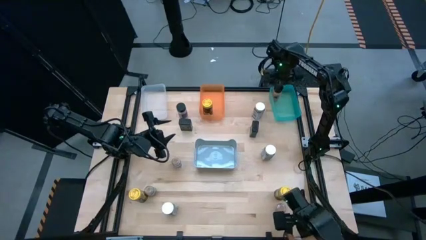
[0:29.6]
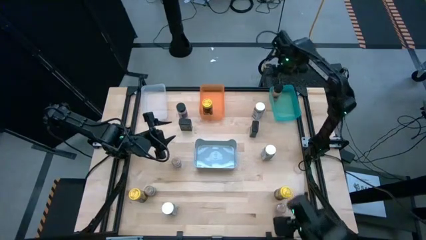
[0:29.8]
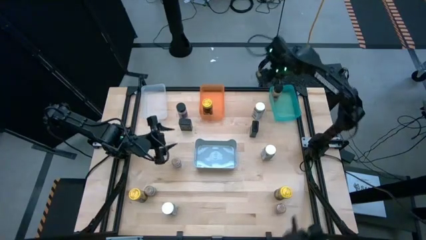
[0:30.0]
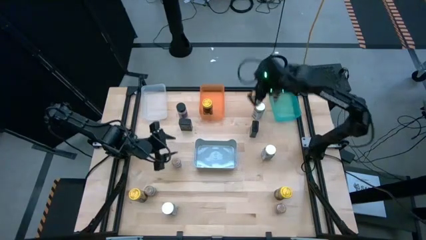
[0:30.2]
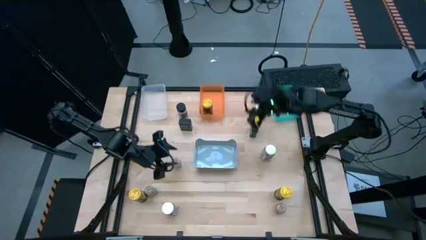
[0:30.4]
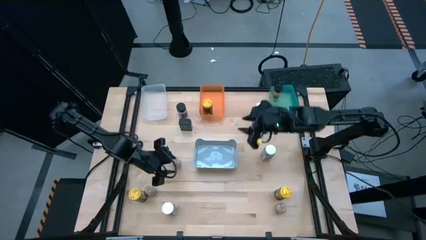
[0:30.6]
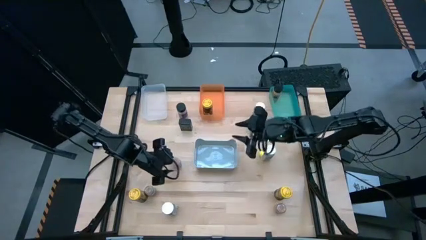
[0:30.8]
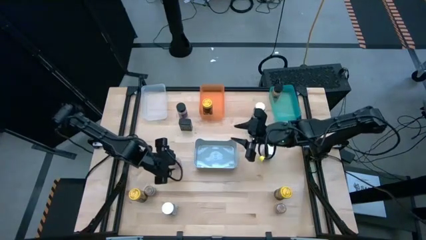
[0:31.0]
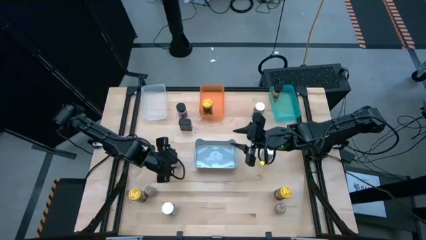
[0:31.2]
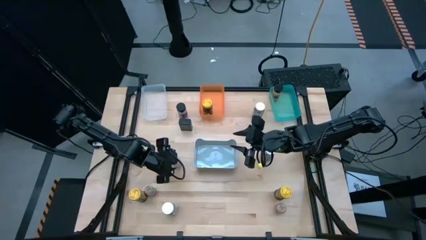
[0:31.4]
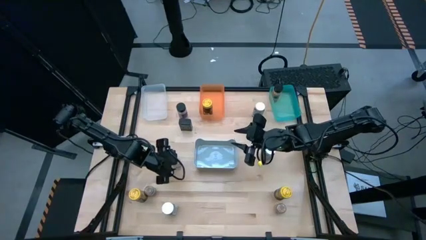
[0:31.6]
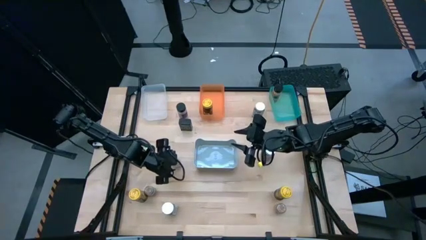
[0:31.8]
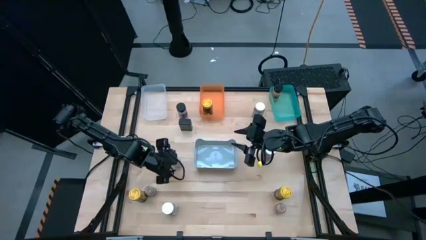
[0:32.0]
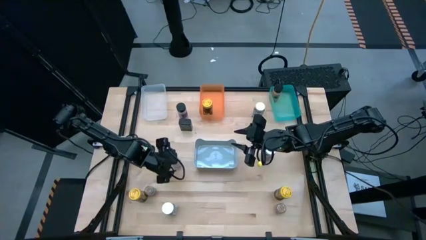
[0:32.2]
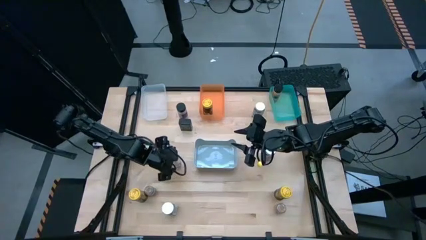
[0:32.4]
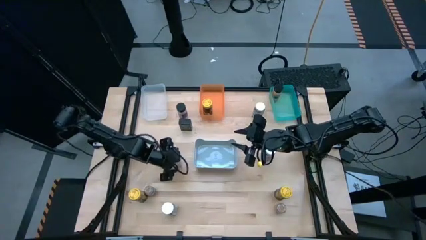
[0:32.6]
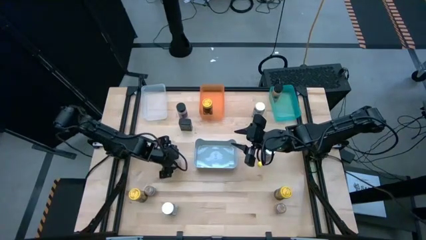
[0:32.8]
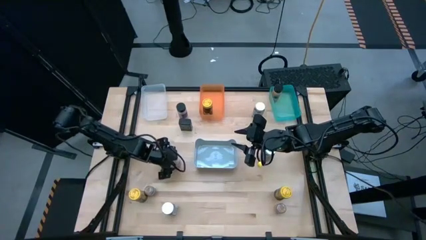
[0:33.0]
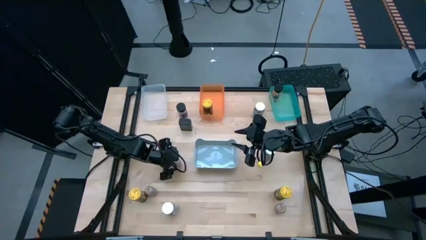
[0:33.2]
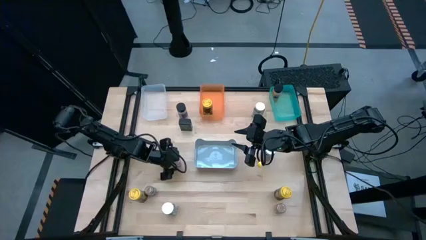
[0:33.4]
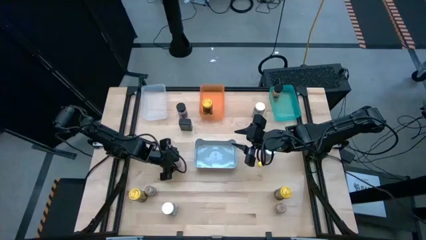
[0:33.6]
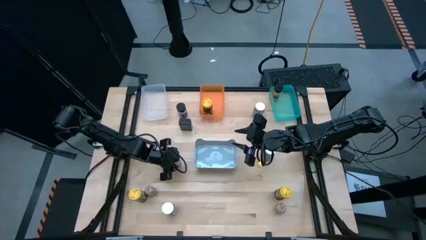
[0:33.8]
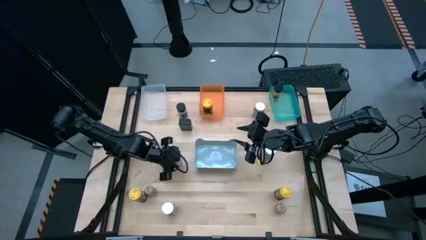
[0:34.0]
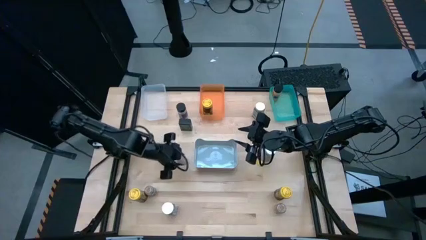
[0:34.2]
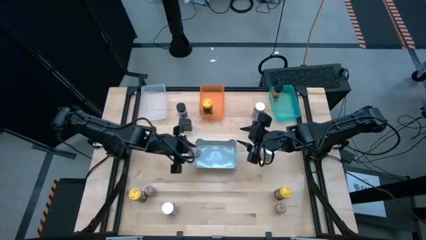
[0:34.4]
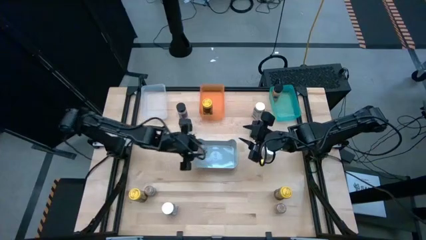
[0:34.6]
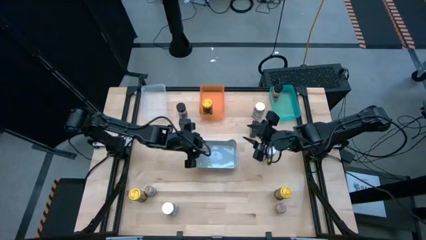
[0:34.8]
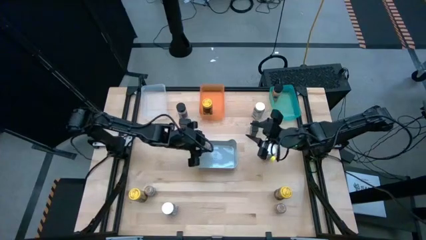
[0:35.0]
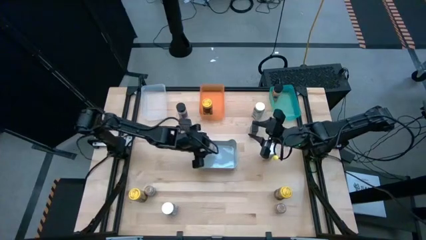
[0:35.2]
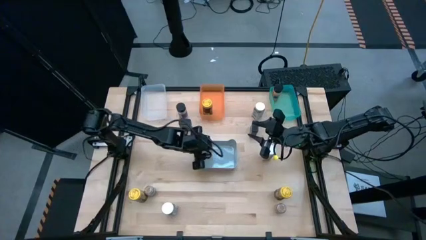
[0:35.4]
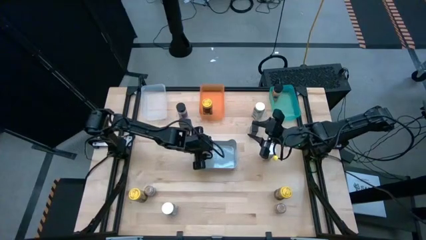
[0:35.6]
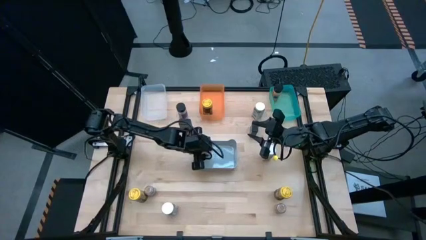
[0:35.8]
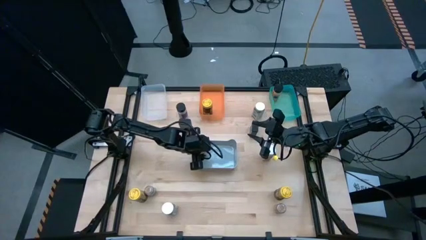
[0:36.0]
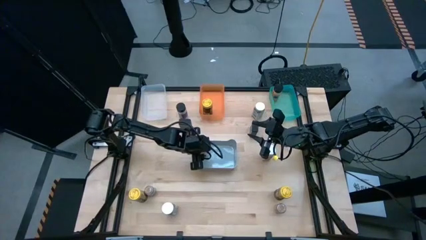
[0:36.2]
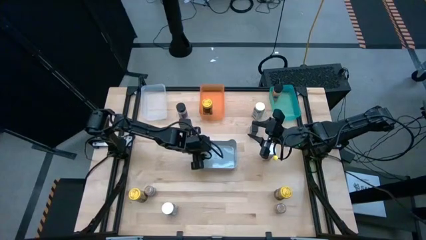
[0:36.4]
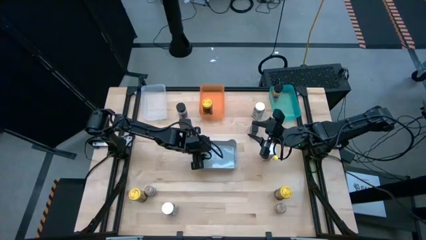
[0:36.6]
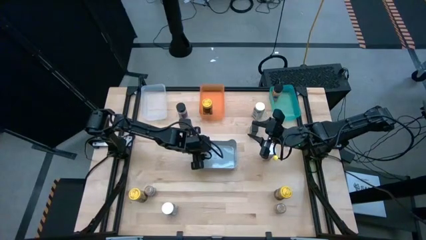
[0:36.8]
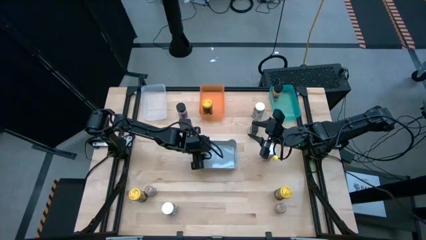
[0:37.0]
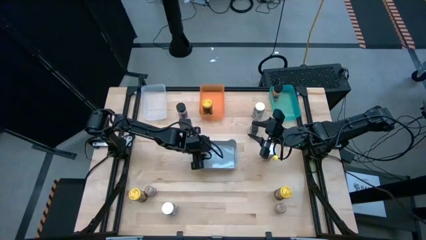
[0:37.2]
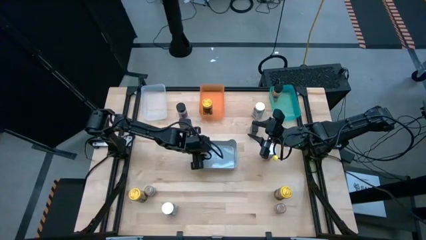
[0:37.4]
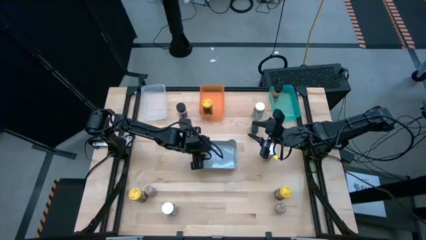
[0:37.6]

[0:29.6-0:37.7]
Task: Sort spices by type
Put the top brown seasoning bottle into the gray bin
